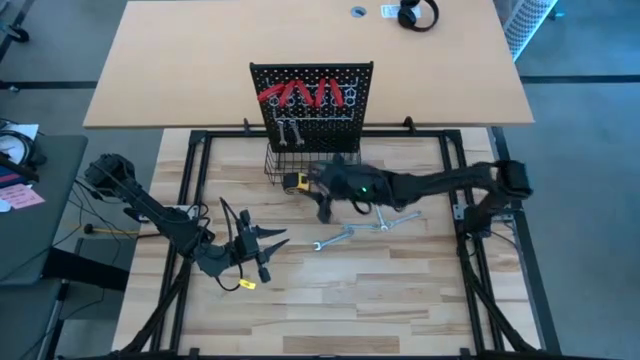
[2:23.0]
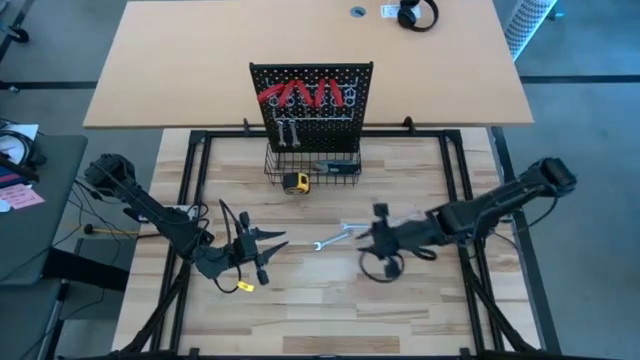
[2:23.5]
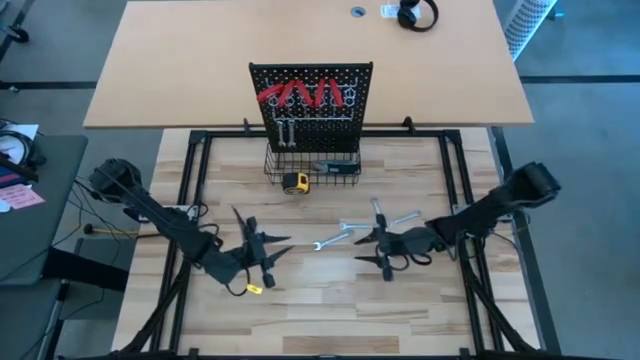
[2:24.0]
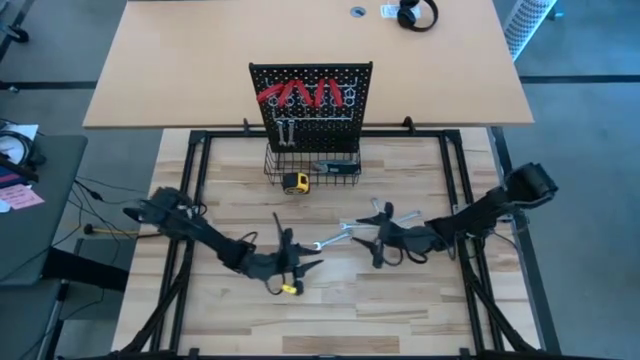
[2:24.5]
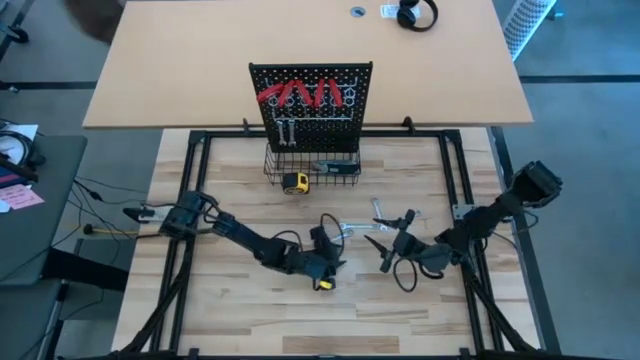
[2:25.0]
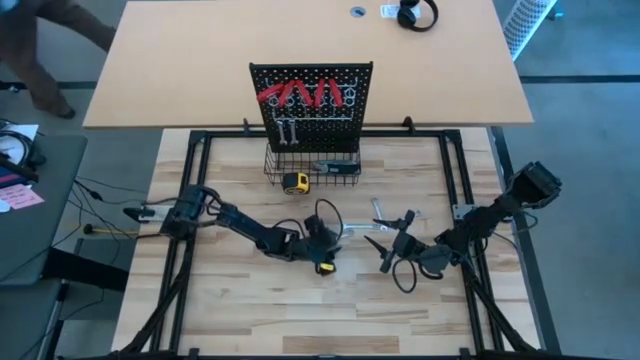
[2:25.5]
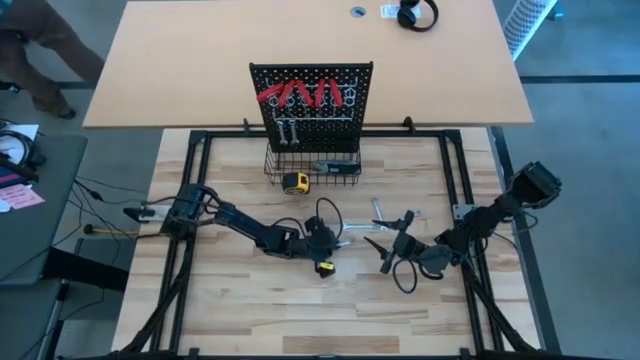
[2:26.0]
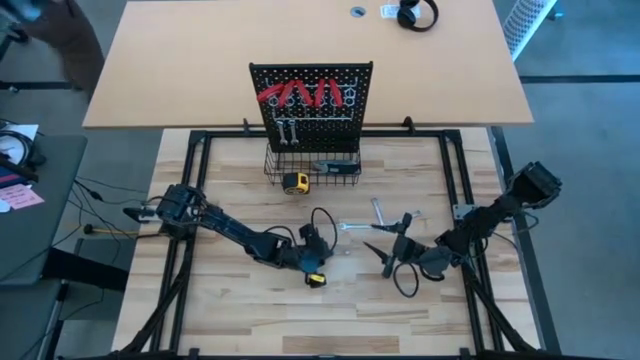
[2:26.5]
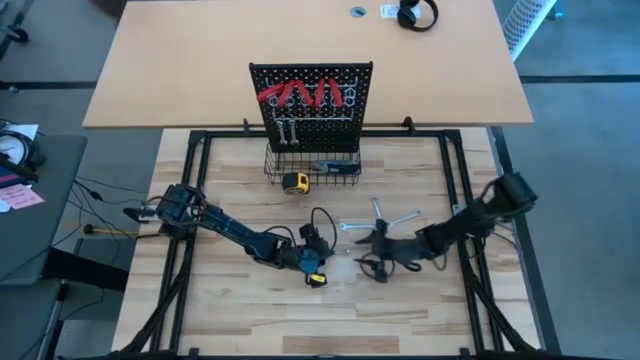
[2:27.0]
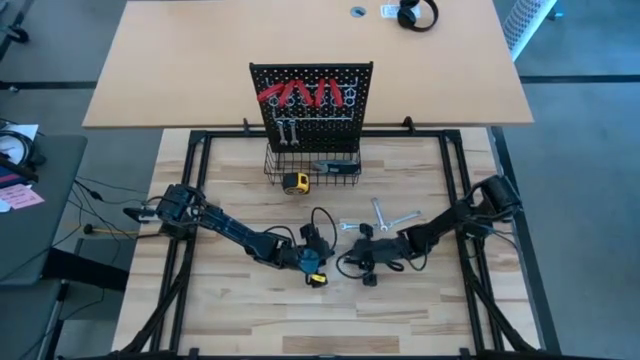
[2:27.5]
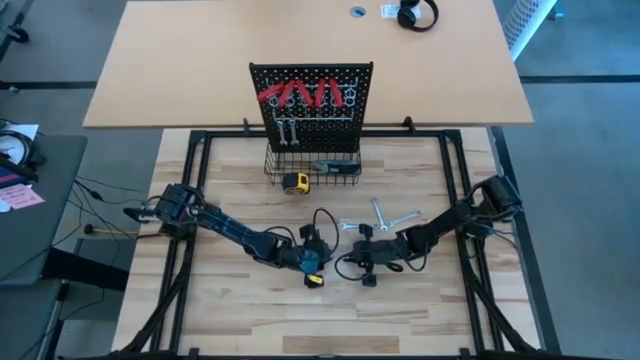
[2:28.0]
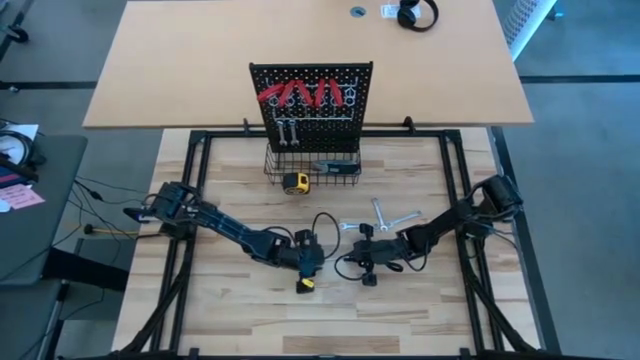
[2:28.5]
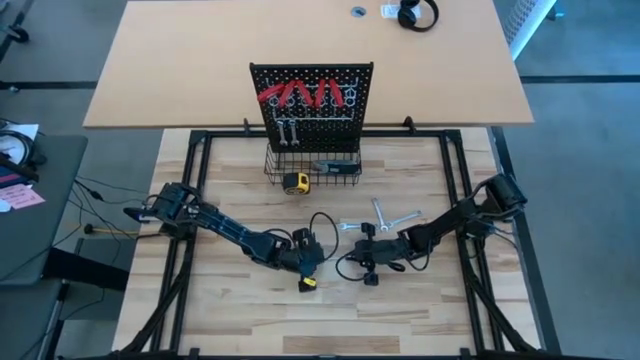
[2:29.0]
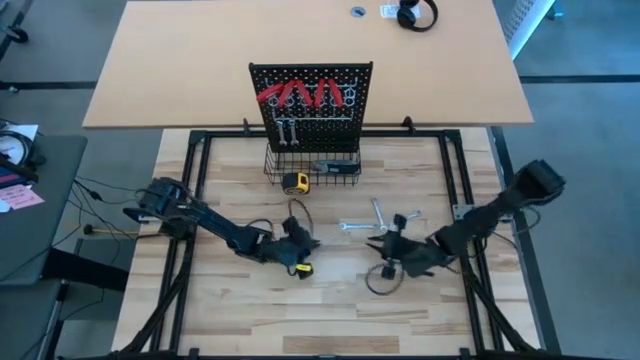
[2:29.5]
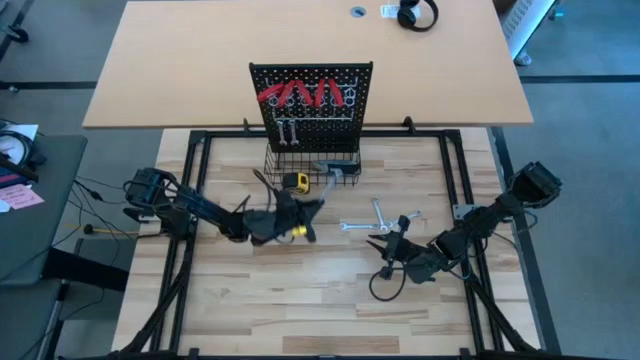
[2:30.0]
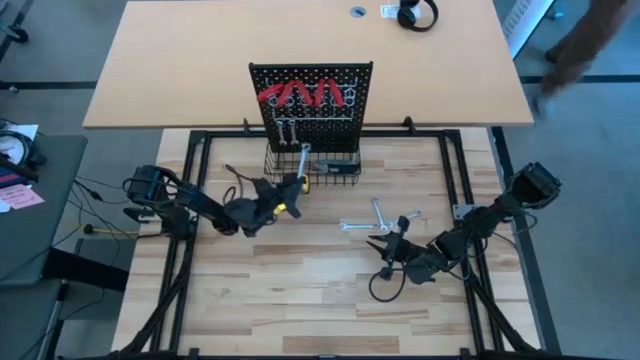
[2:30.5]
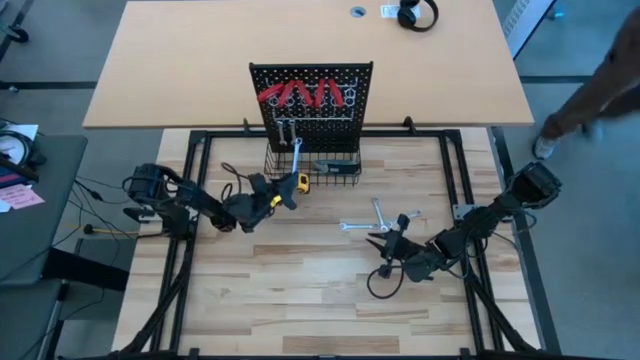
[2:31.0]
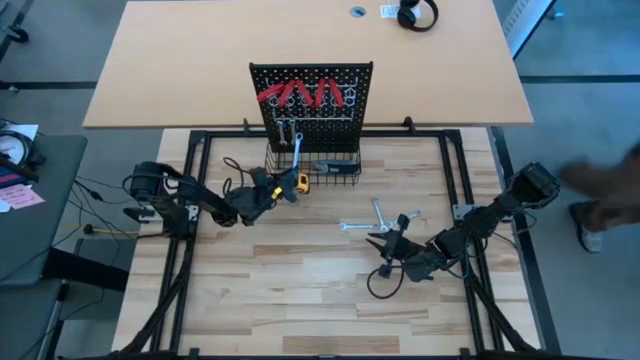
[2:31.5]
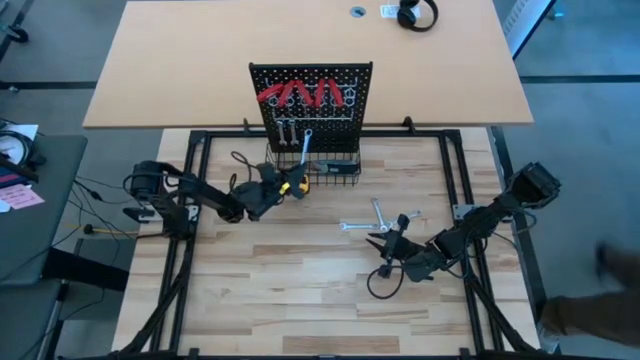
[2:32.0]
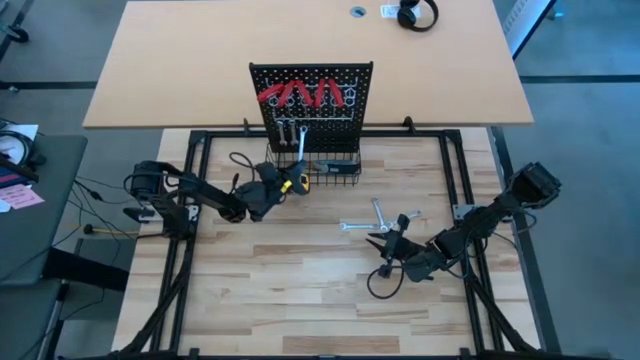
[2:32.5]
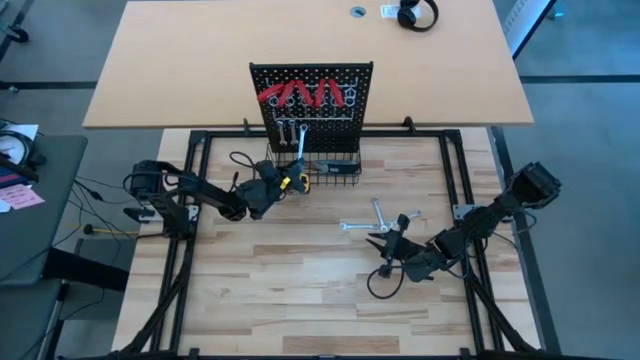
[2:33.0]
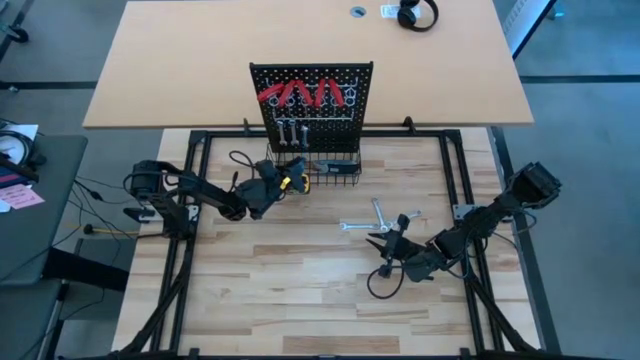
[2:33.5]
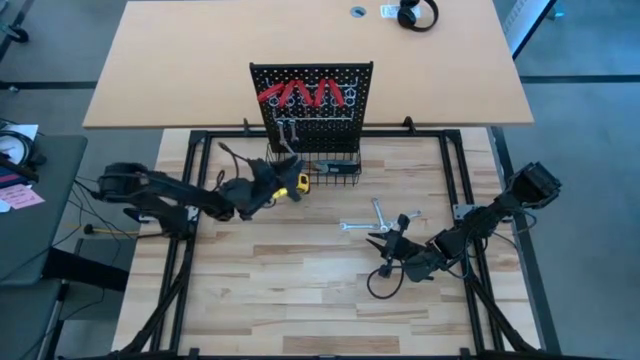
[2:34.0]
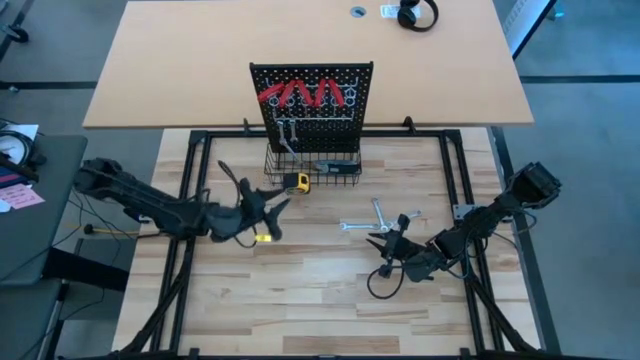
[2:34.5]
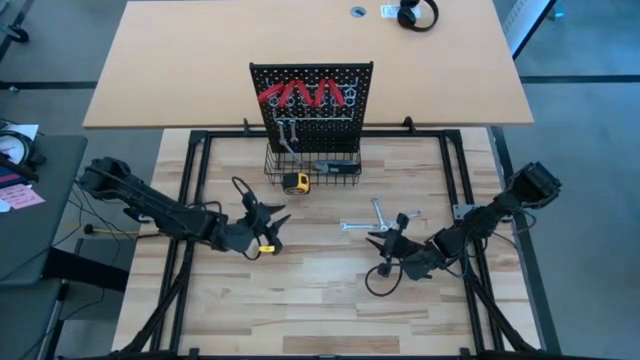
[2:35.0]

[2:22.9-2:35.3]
Task: Hang tools onto peg board
Hang the wrench into the pegboard
